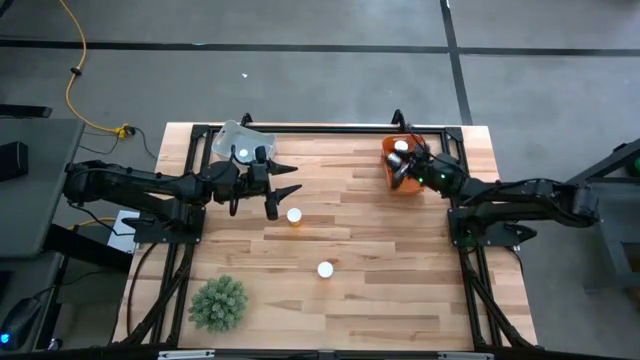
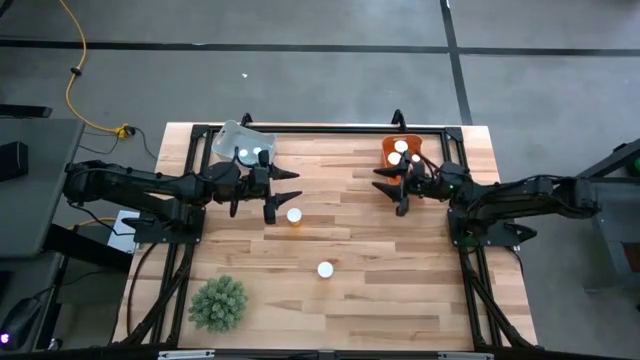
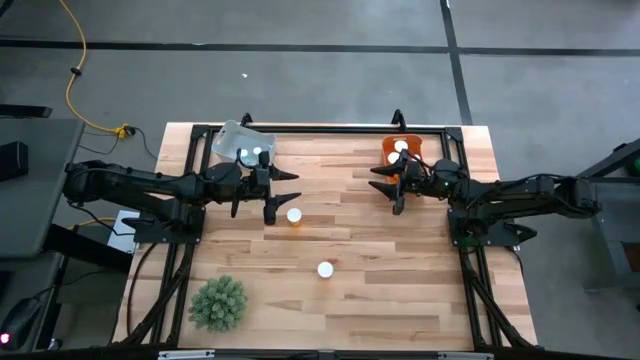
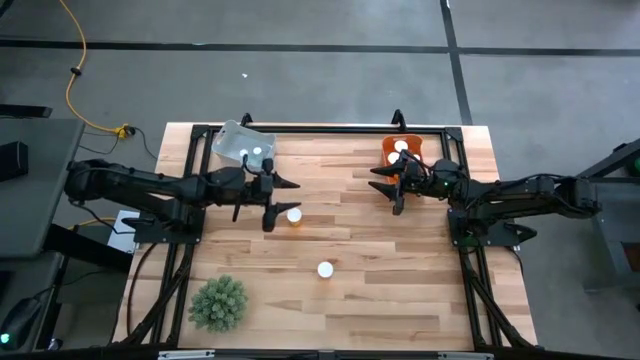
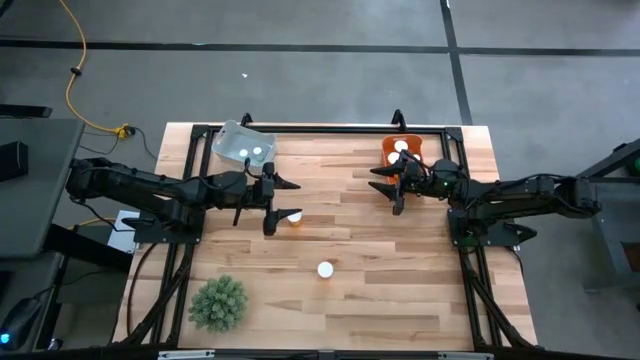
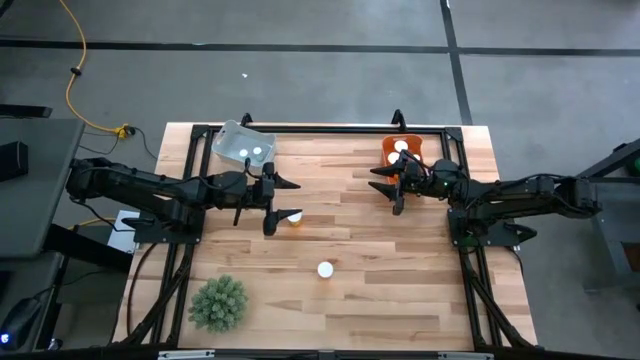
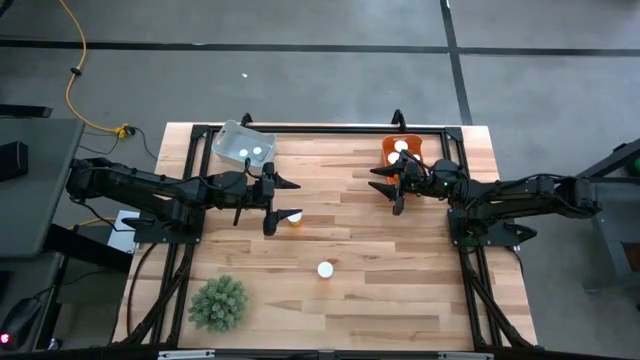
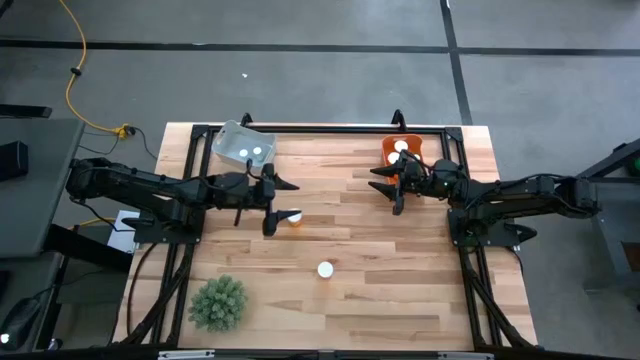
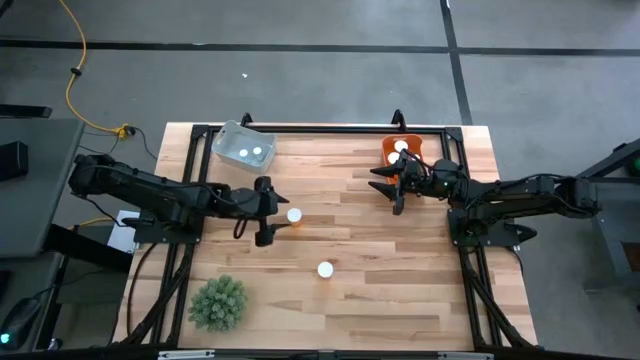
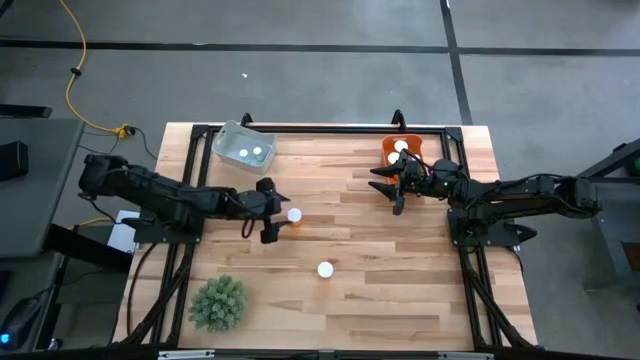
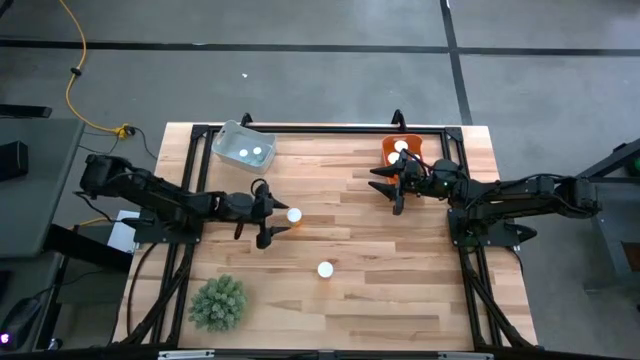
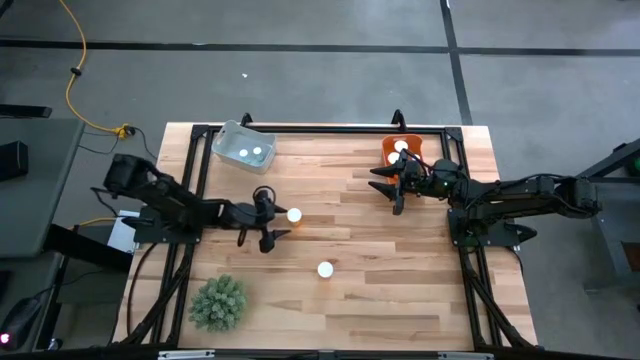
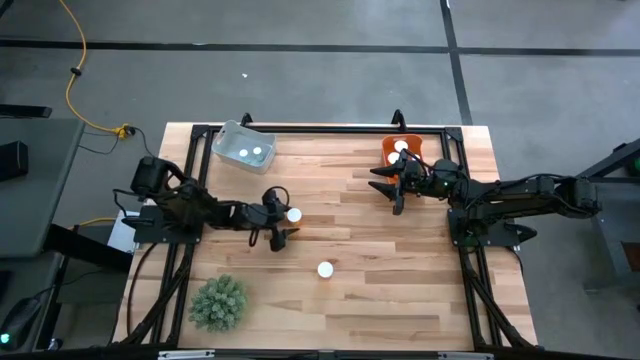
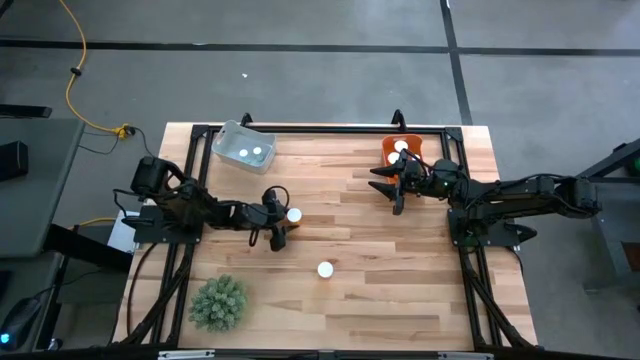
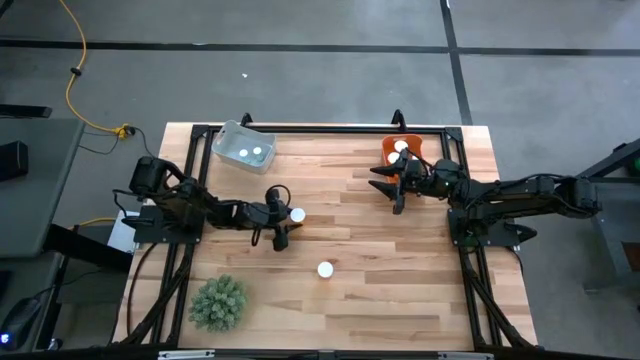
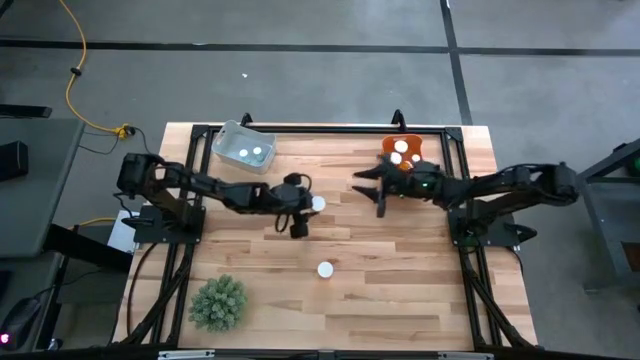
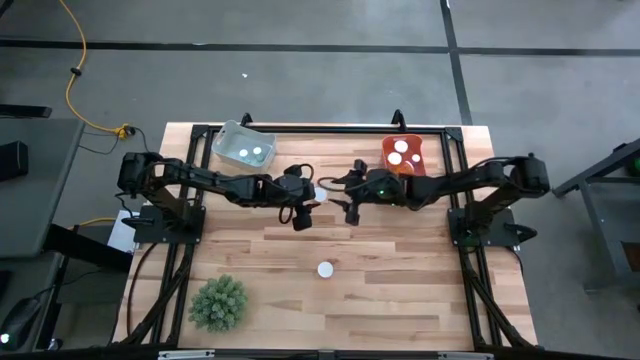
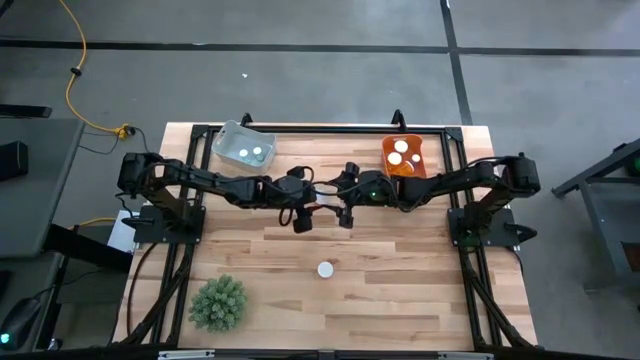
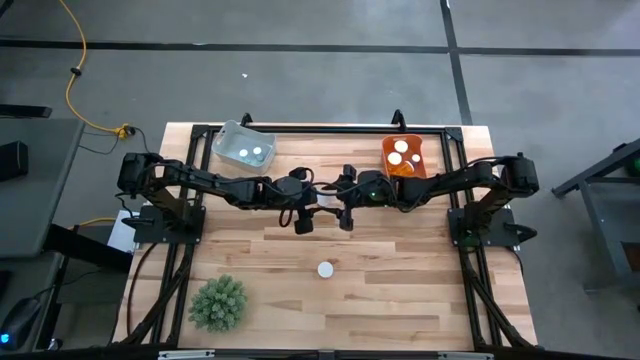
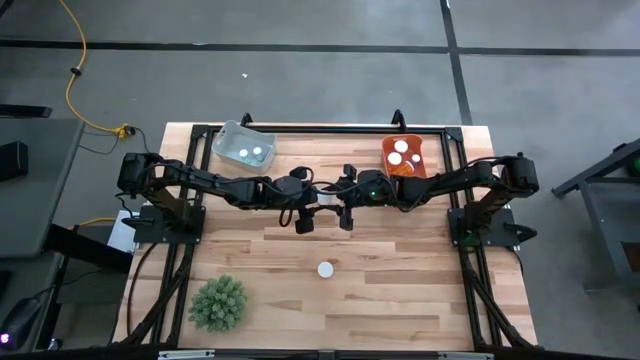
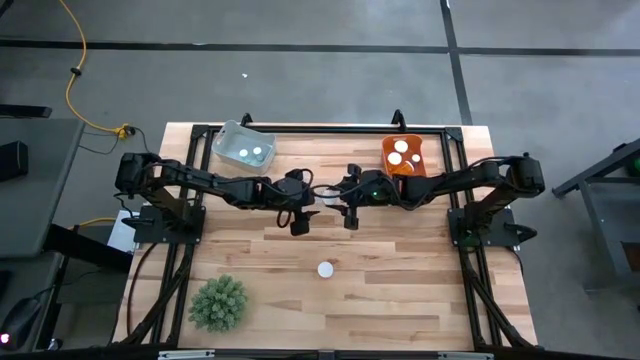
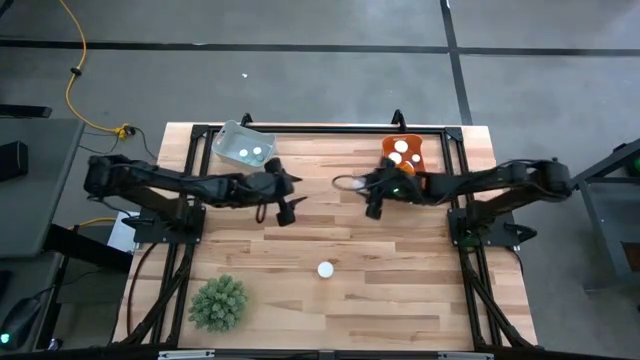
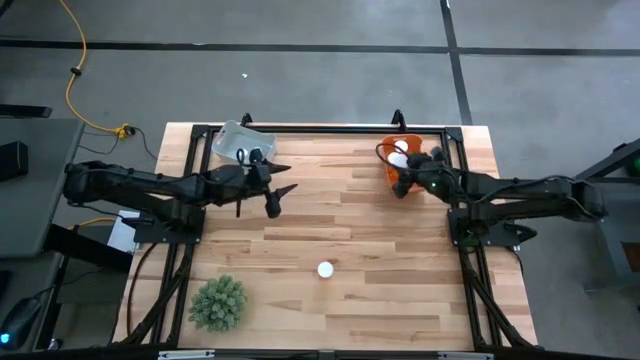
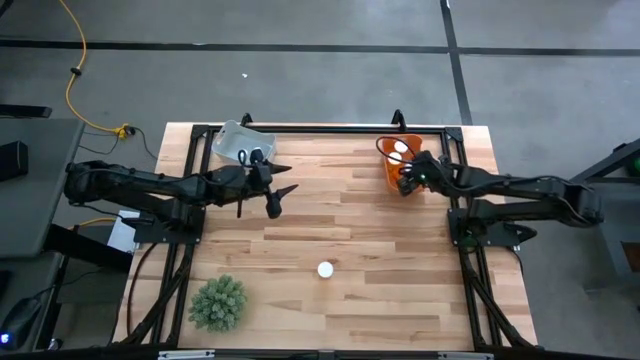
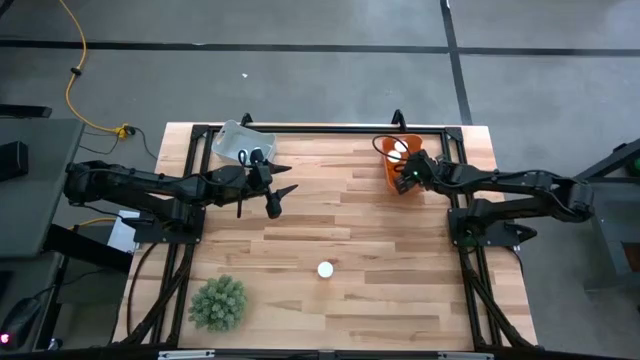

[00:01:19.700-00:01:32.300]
Task: Pick and place medicine bottles into bin by pill shape (circle, oval)
Put the top orange capsule bottle into the orange bin

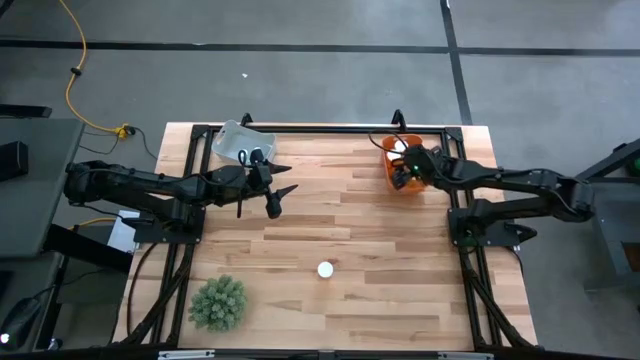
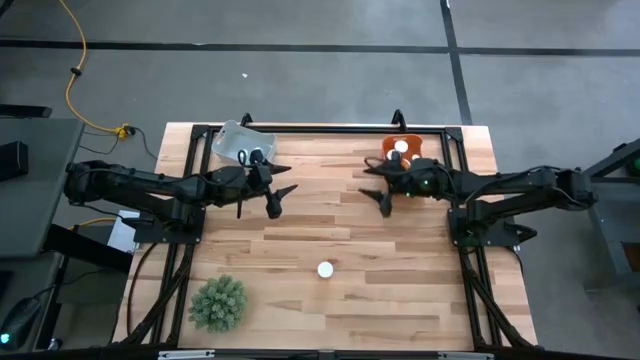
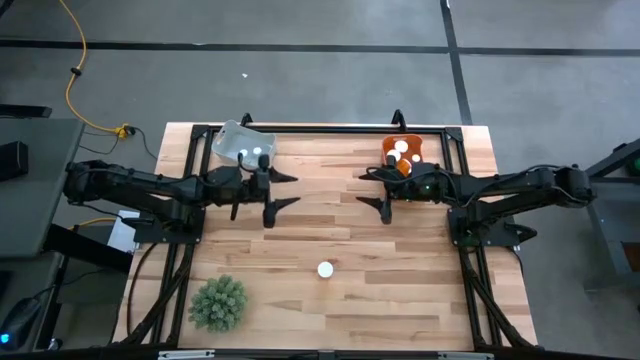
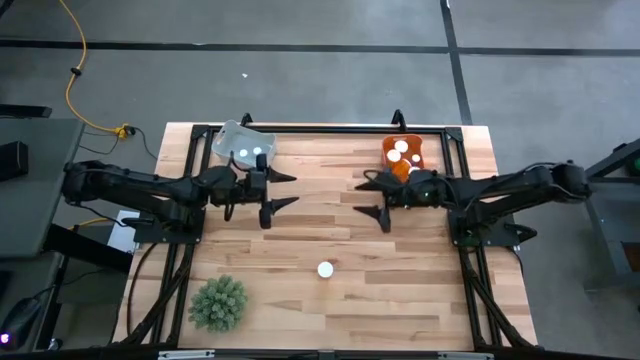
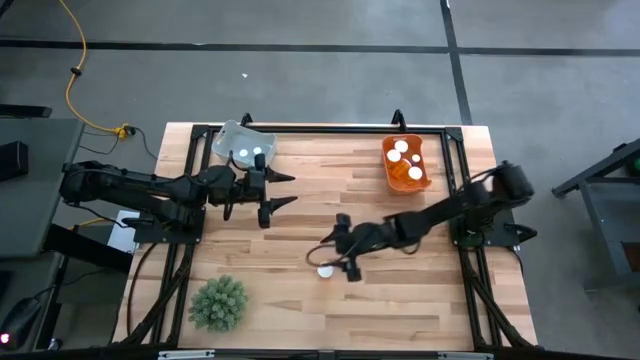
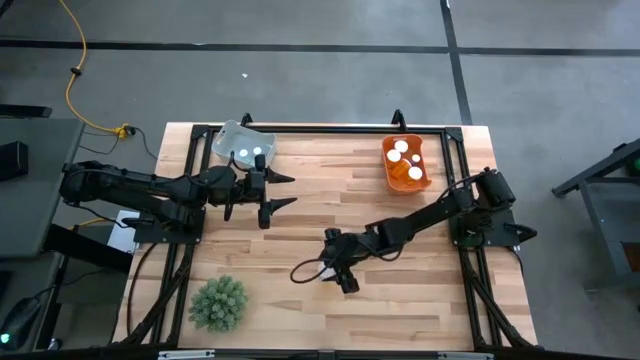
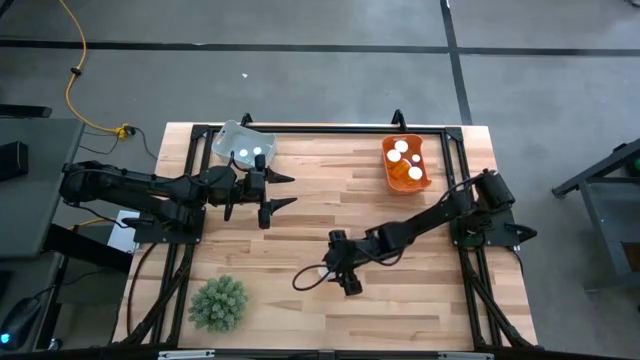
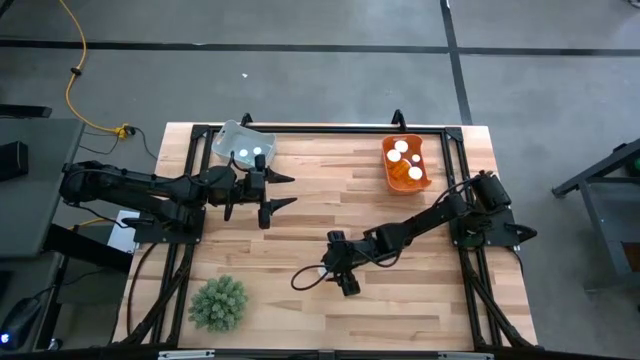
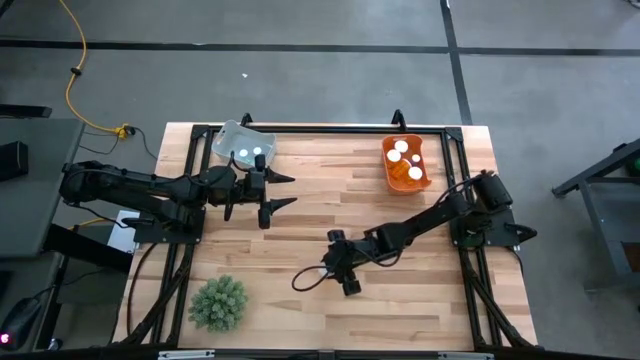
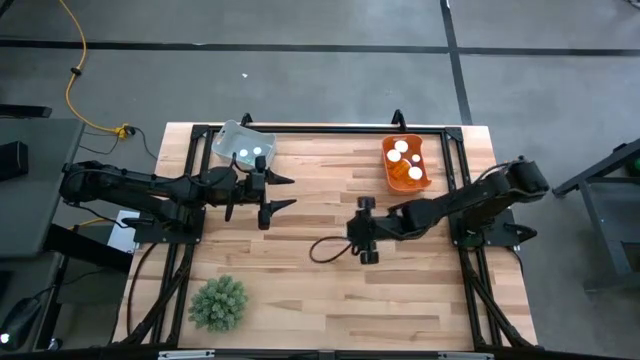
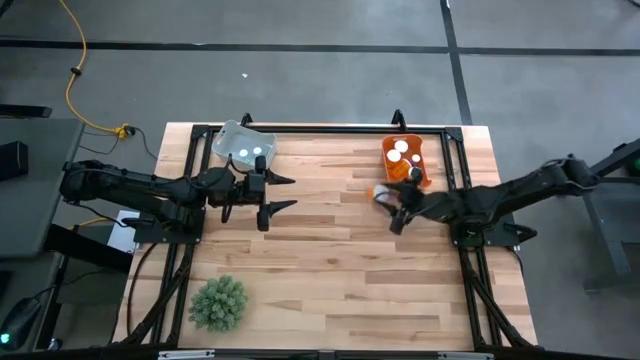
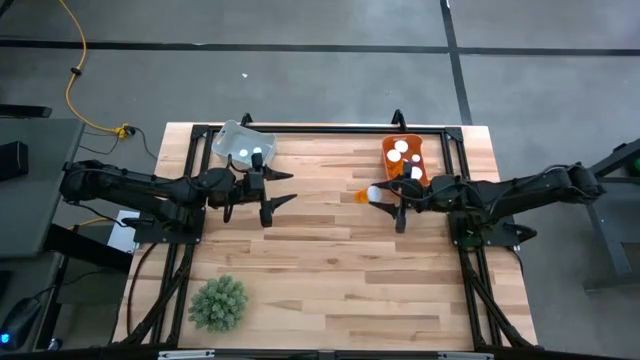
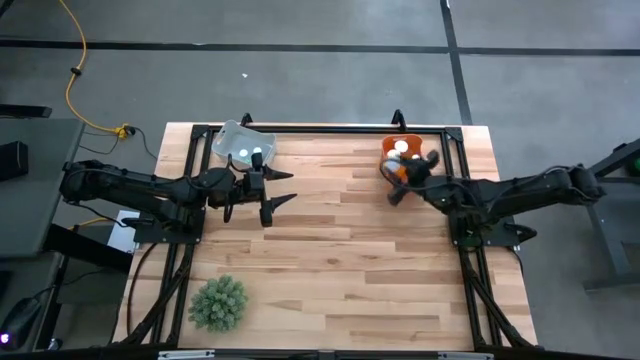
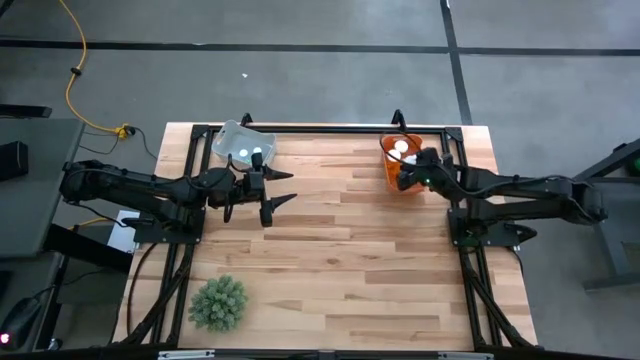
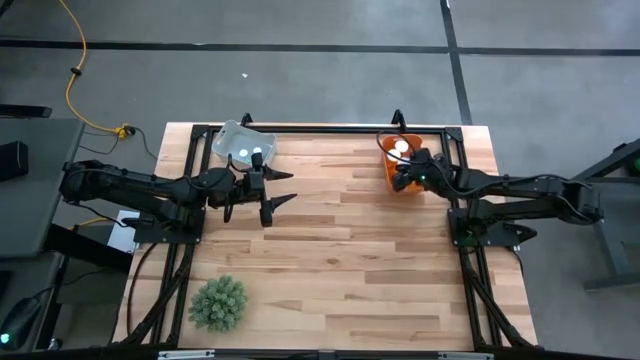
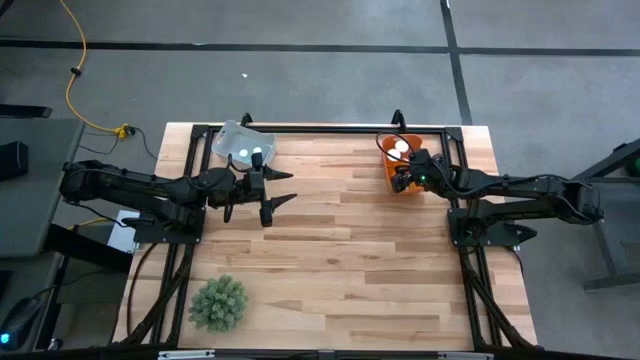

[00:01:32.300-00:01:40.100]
Put the orange capsule bottle into the orange bin
